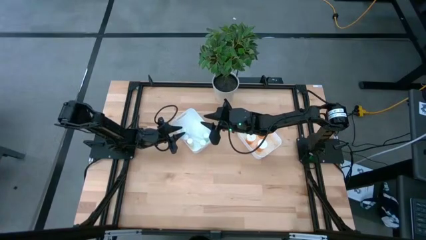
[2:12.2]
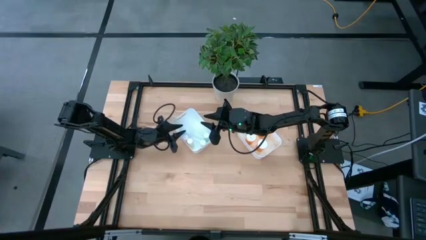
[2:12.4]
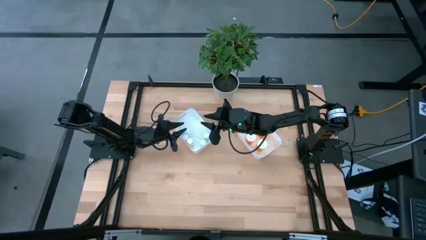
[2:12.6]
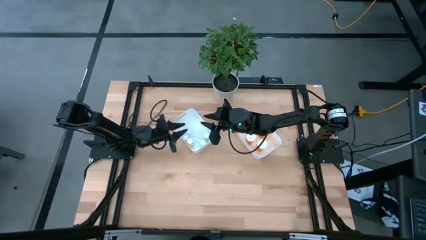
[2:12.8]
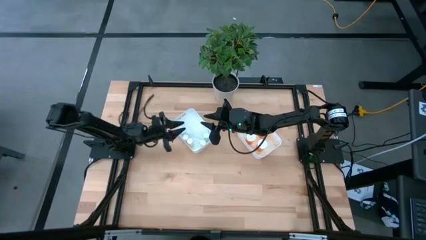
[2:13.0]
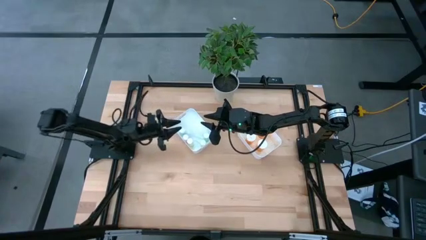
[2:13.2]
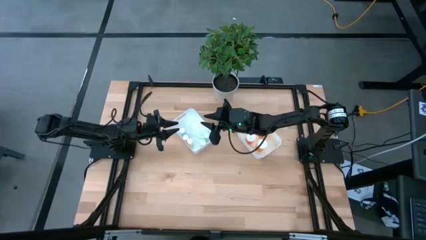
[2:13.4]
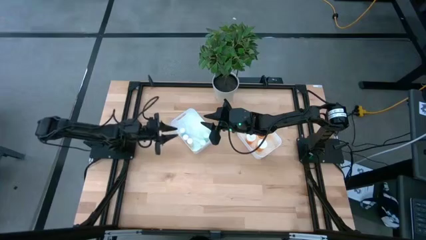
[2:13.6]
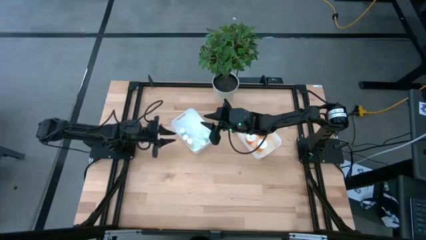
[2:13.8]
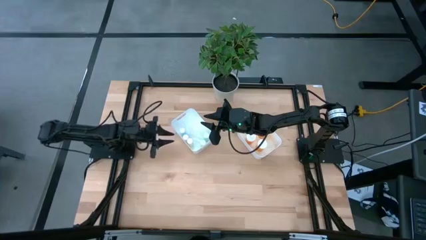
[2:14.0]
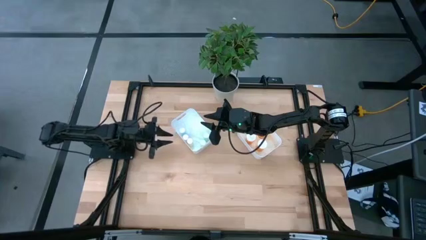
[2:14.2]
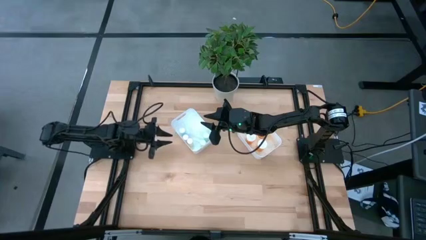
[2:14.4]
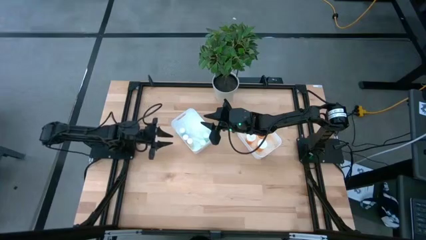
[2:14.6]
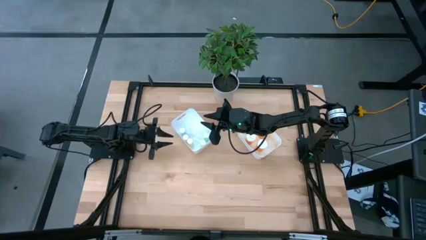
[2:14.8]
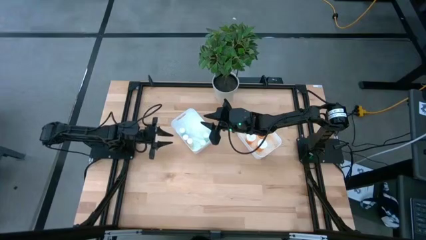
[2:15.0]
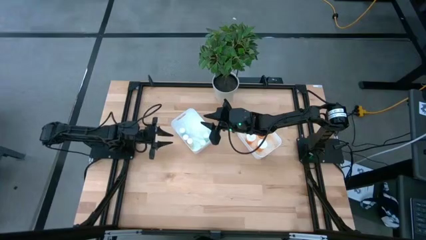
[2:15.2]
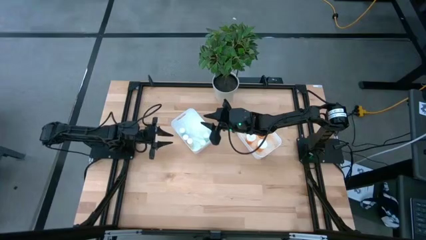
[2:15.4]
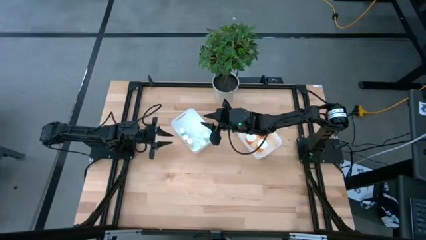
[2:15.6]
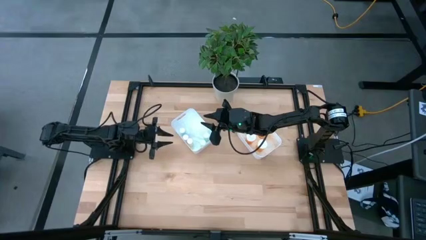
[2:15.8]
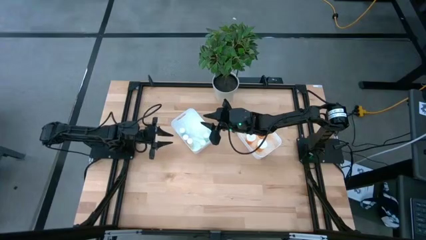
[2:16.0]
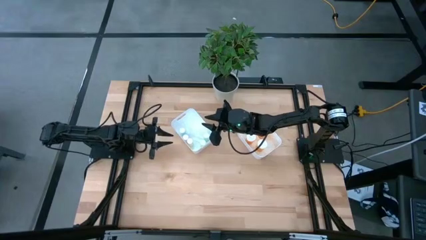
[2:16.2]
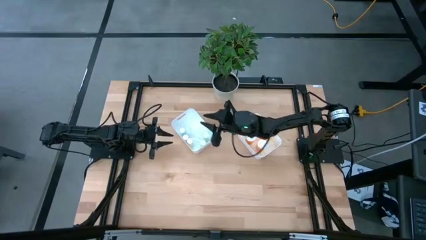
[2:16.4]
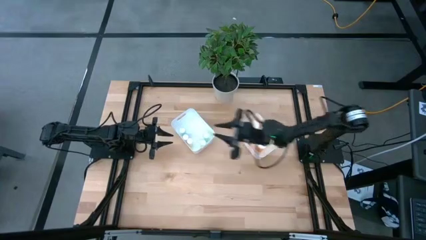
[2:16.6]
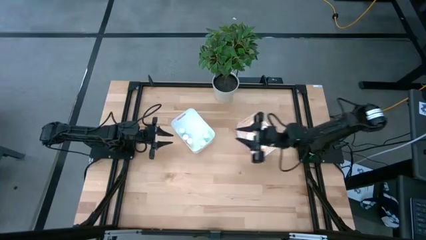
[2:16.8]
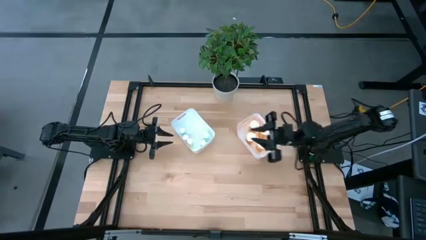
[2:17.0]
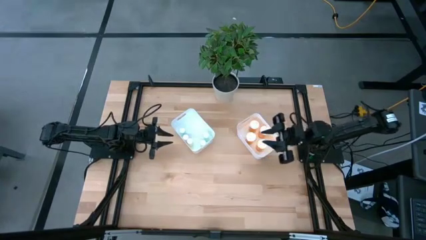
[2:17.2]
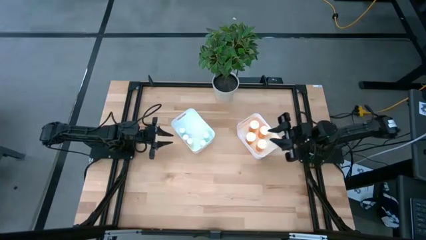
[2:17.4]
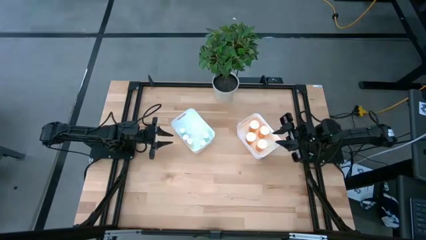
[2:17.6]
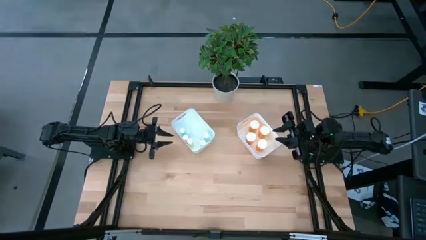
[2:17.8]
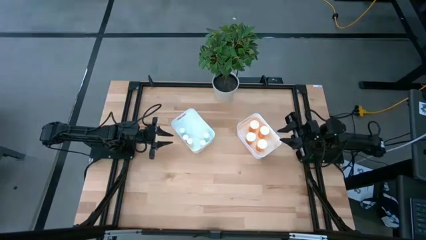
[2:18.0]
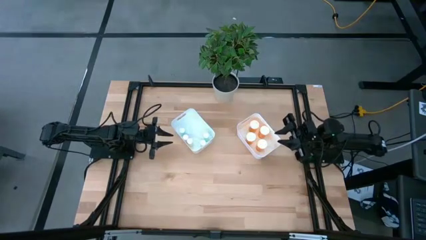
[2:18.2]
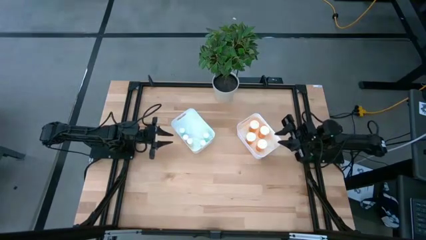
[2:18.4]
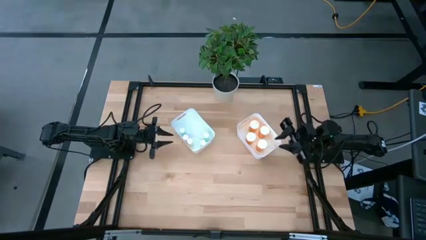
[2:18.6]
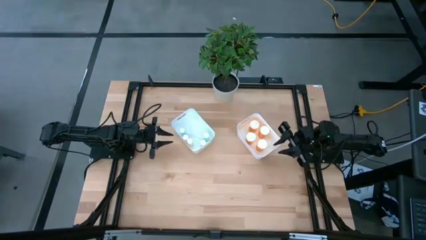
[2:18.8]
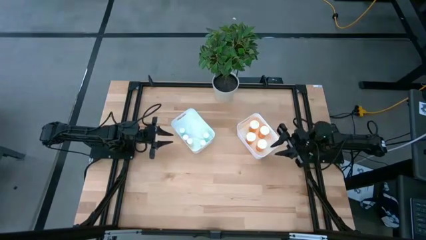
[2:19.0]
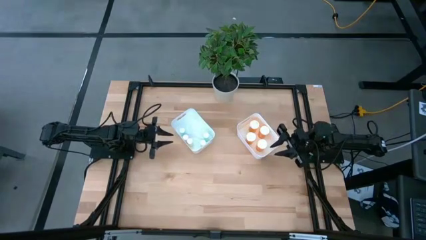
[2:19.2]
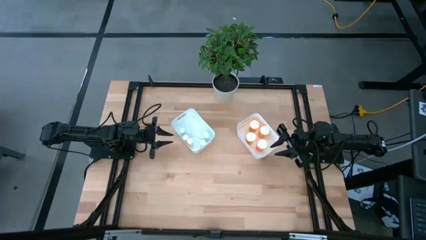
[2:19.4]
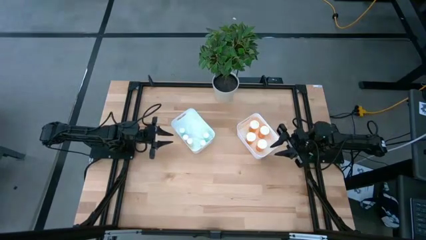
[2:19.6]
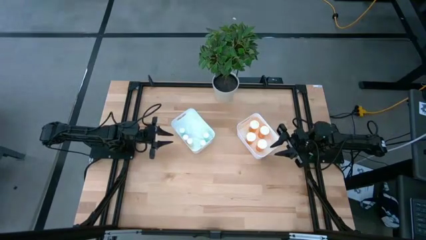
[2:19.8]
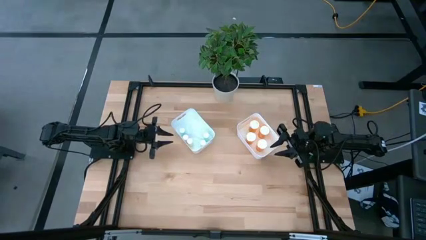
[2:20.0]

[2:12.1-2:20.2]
Task: Pick and place medicine bottles into bin by pill shape (circle, oval)
Return to Home Position

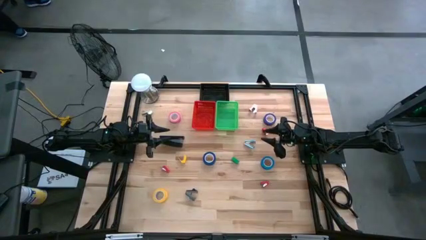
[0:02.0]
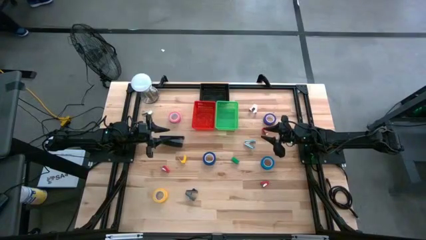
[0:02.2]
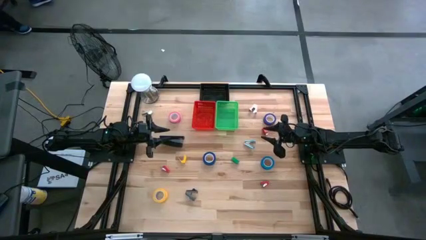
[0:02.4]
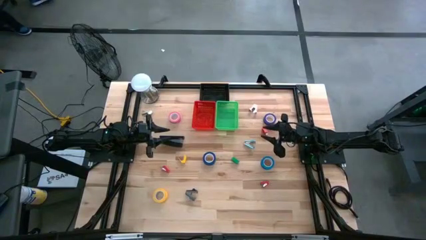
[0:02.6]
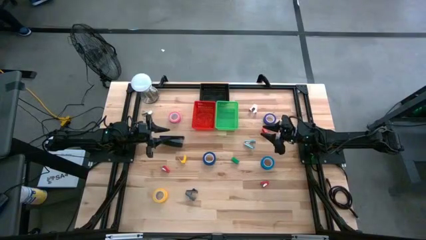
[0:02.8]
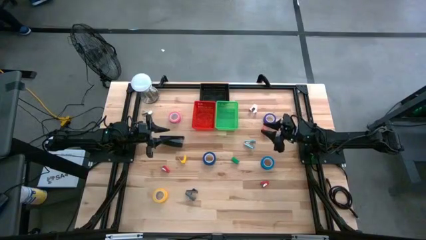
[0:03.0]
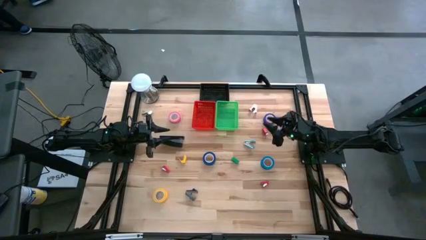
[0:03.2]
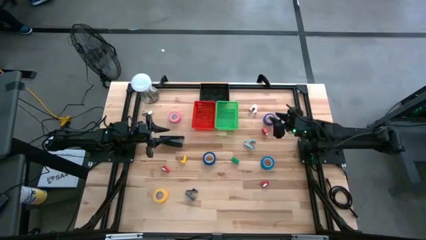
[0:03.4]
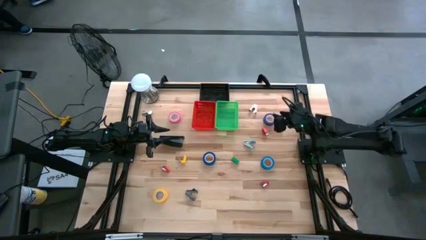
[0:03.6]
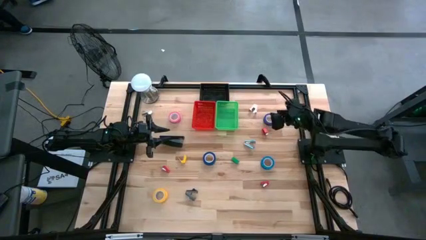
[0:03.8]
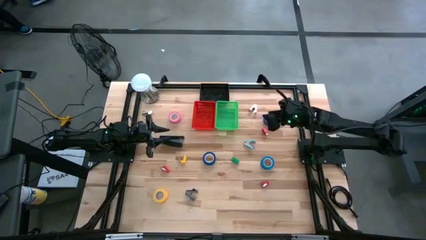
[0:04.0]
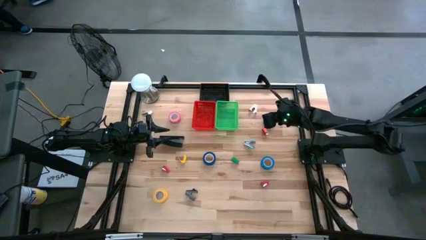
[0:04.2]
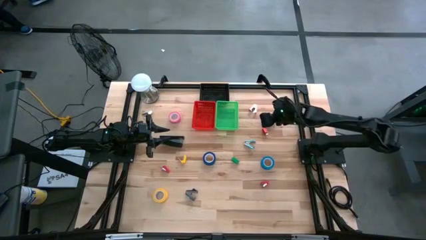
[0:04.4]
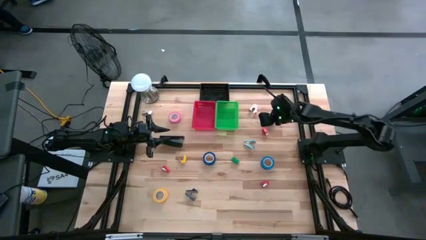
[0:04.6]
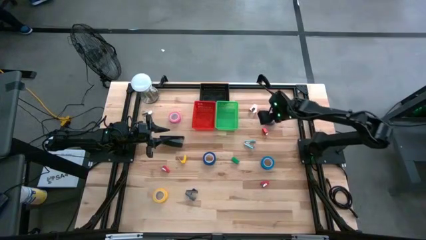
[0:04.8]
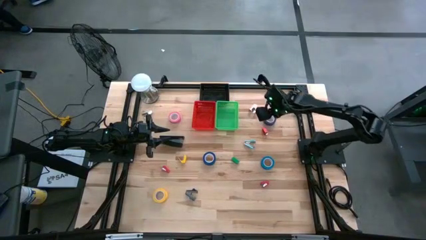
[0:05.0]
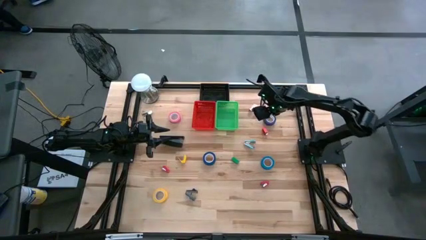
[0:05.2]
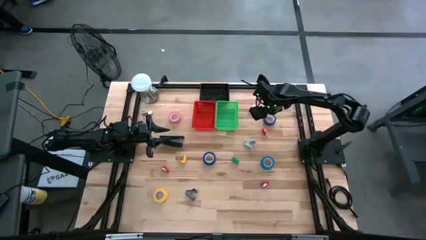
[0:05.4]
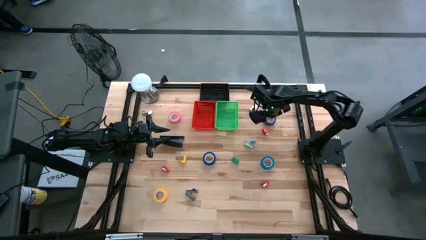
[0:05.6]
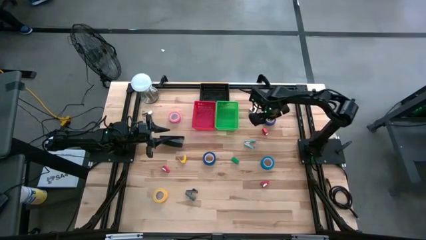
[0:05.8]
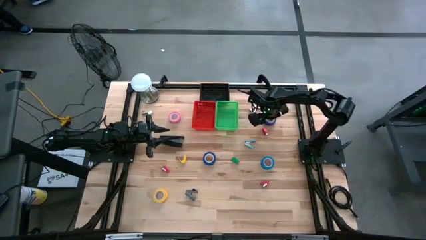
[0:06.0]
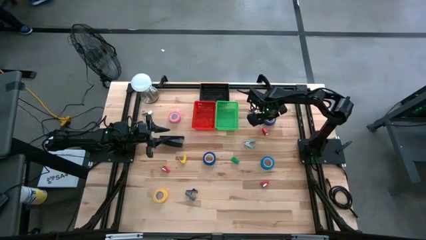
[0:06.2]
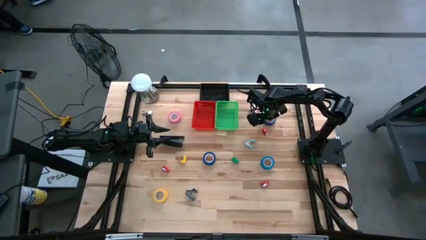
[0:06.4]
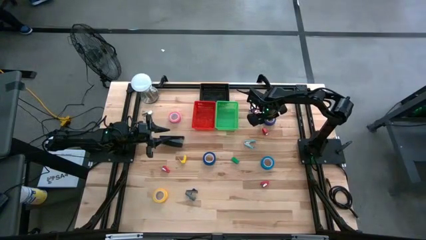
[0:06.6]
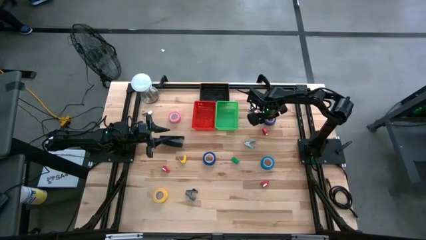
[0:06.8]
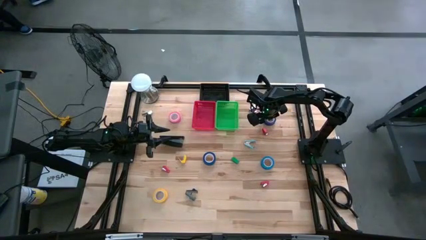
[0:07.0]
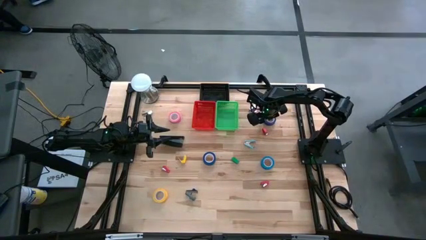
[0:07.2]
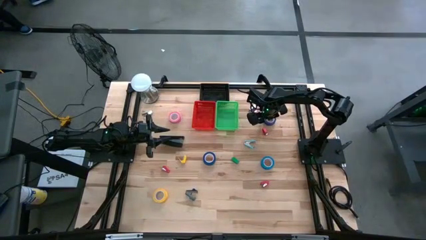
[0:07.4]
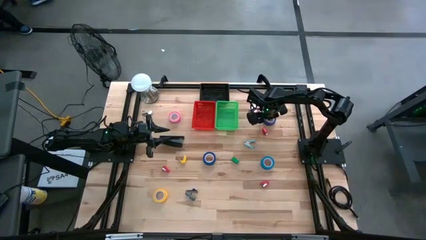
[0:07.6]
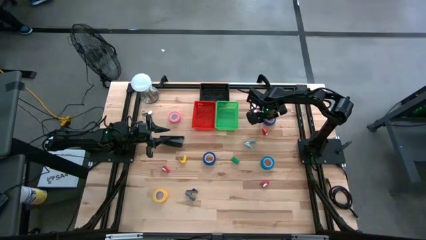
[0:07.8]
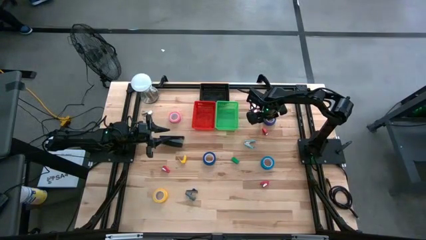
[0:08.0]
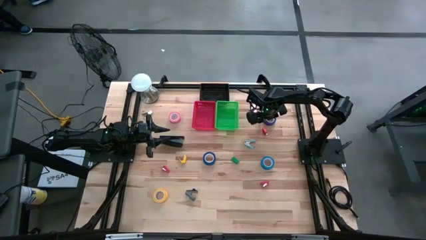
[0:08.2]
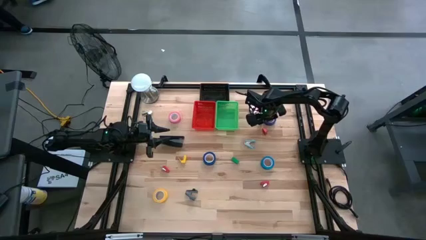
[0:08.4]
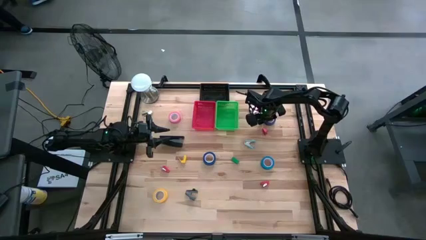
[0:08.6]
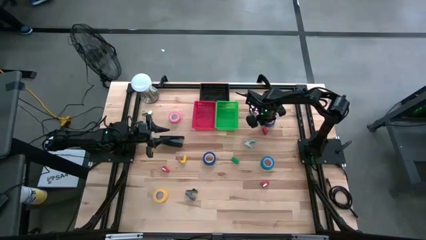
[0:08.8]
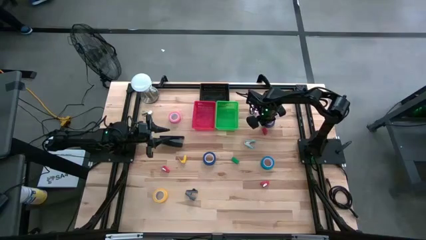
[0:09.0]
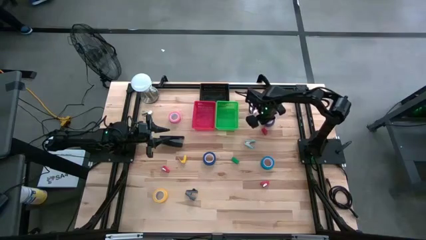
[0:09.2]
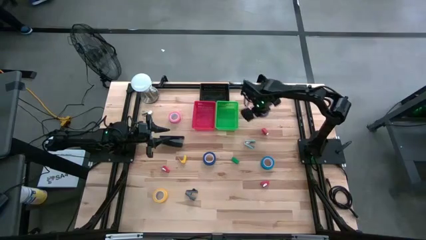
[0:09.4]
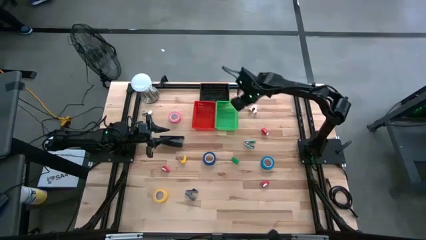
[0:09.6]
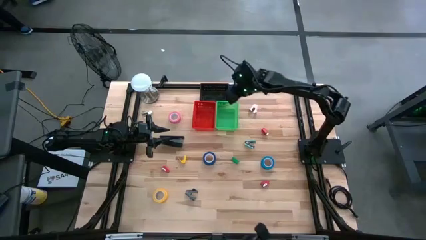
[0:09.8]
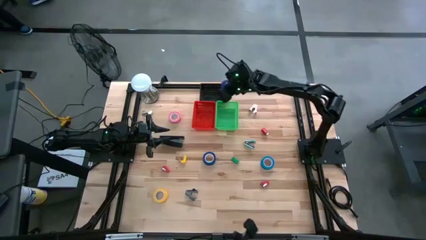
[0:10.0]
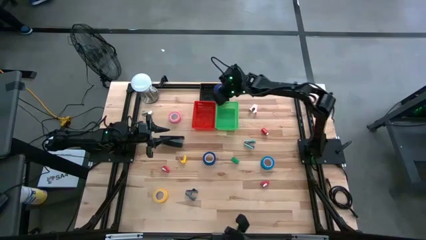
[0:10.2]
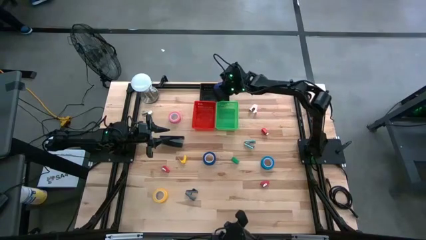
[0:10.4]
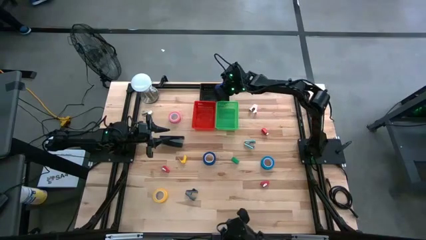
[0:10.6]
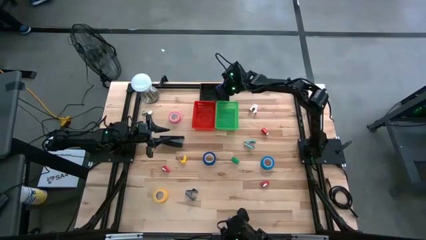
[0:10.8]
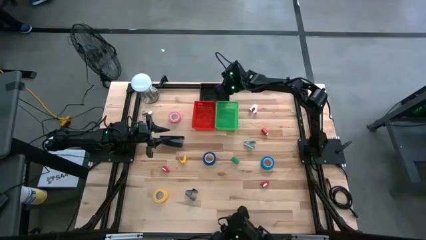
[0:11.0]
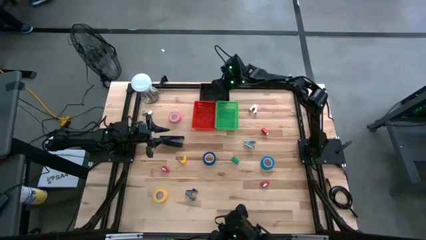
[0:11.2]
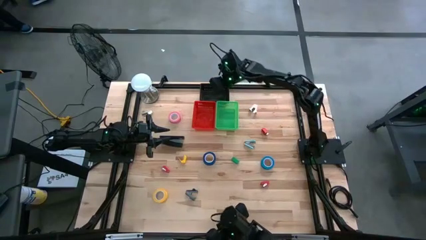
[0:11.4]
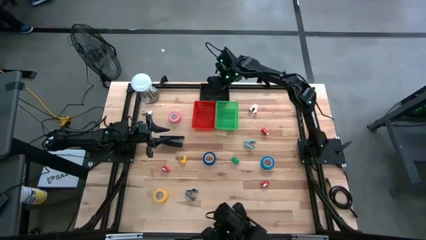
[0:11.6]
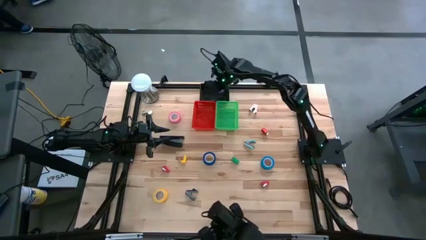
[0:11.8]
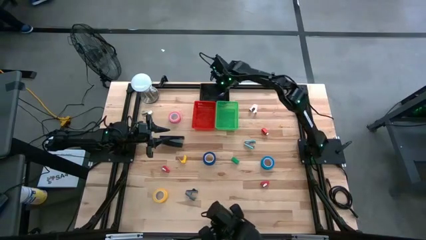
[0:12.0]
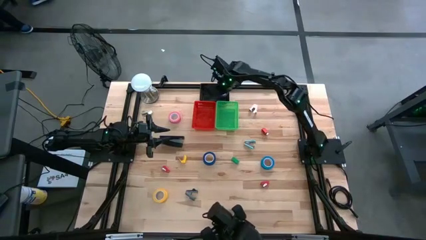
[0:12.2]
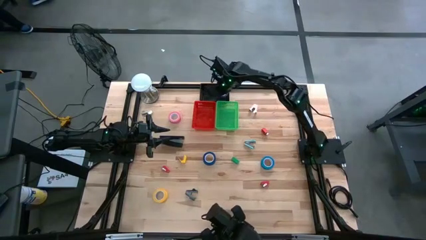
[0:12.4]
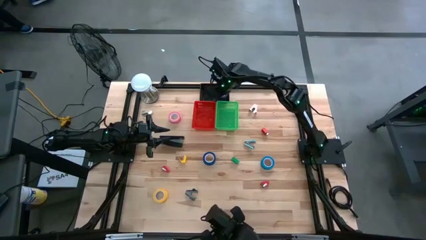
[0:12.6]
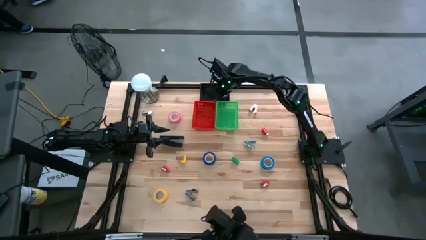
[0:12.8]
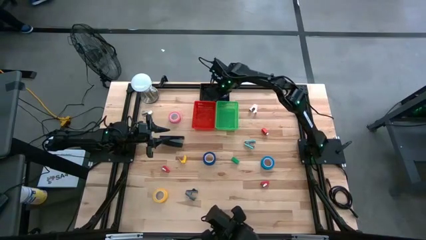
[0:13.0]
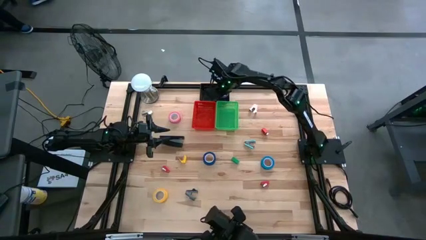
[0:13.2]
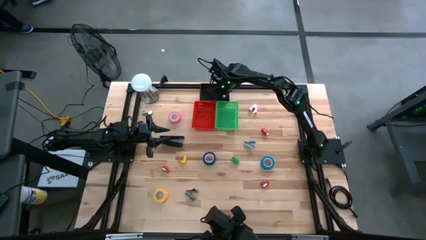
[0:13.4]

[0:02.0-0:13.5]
Task: Pick and place Stapler, Stapler remover, tape
Put the purple tape into the black bin
